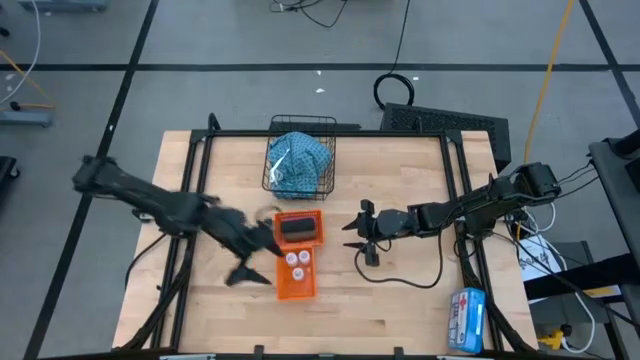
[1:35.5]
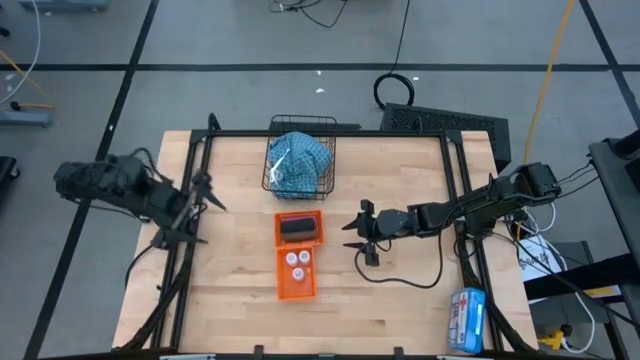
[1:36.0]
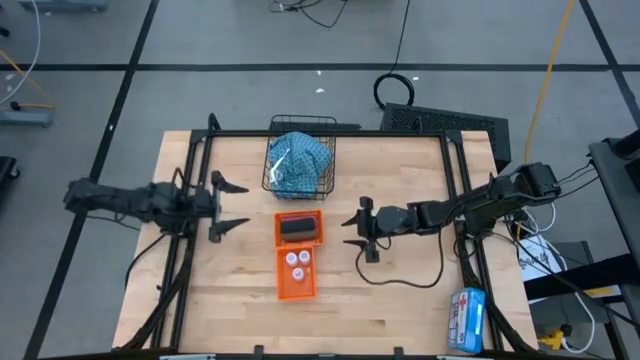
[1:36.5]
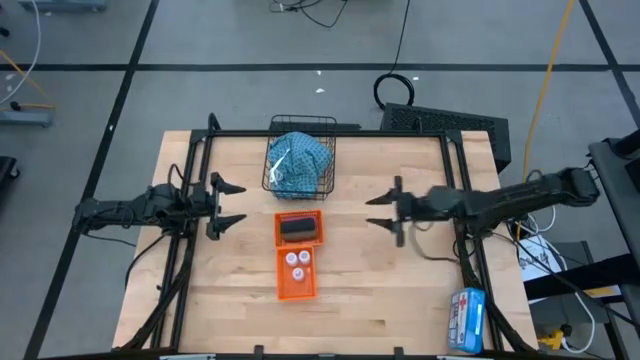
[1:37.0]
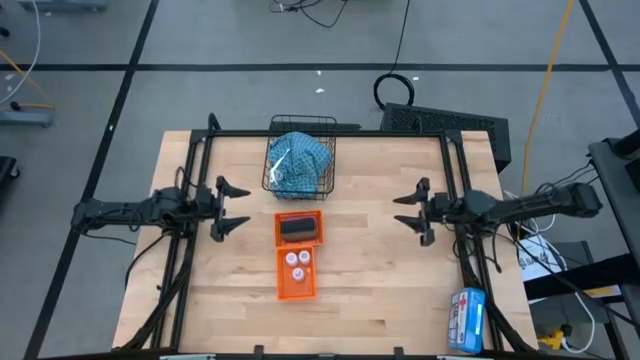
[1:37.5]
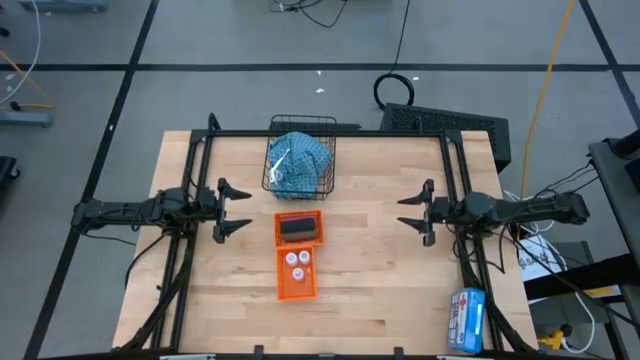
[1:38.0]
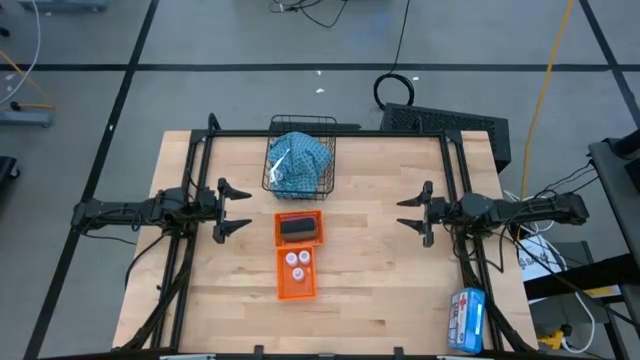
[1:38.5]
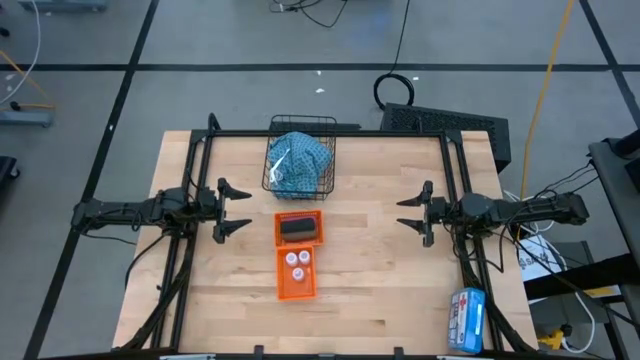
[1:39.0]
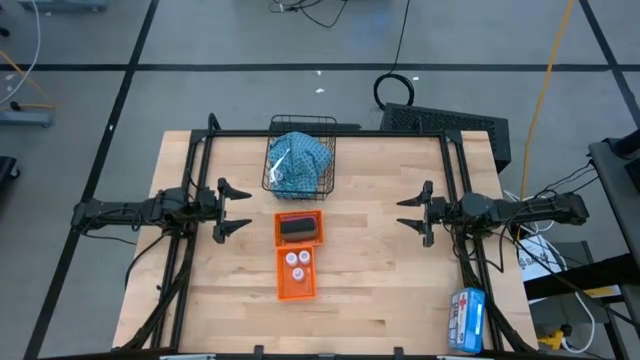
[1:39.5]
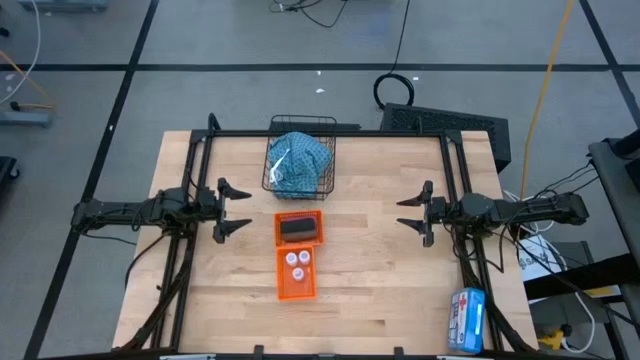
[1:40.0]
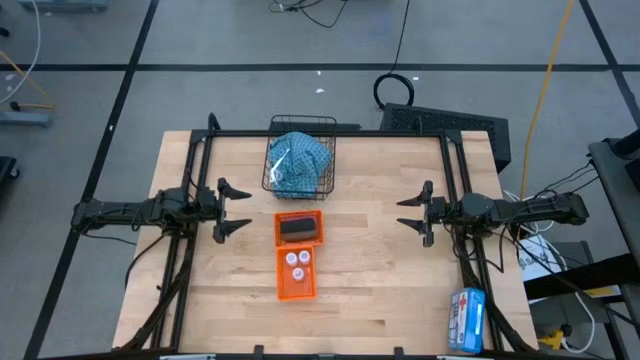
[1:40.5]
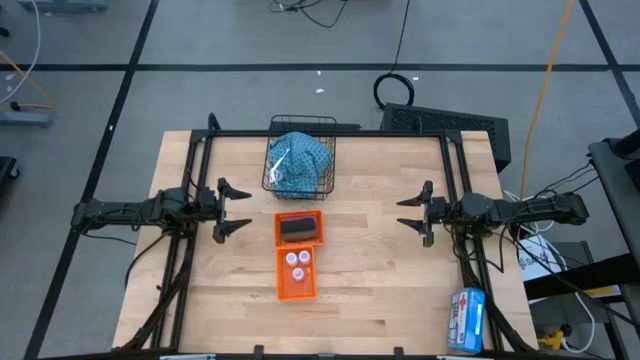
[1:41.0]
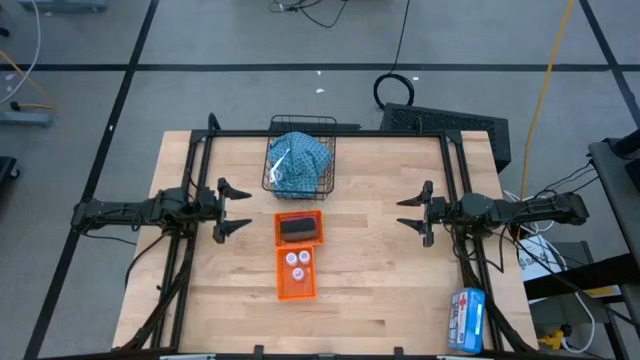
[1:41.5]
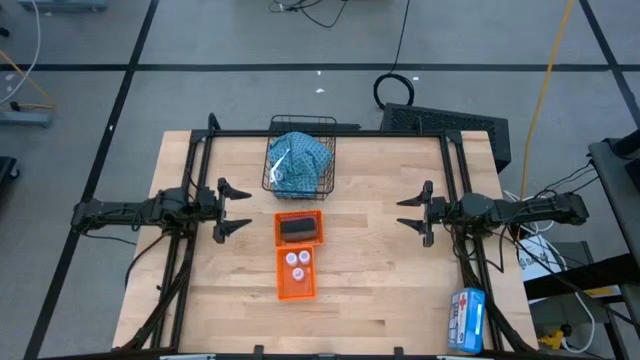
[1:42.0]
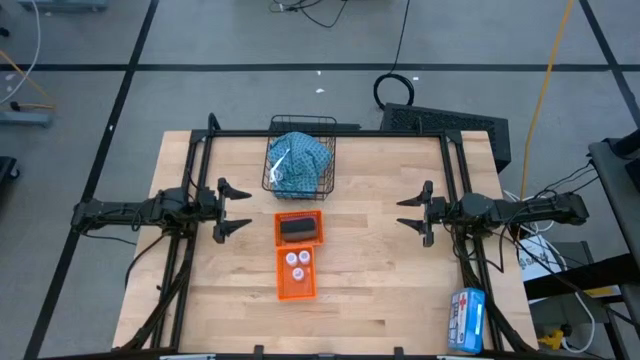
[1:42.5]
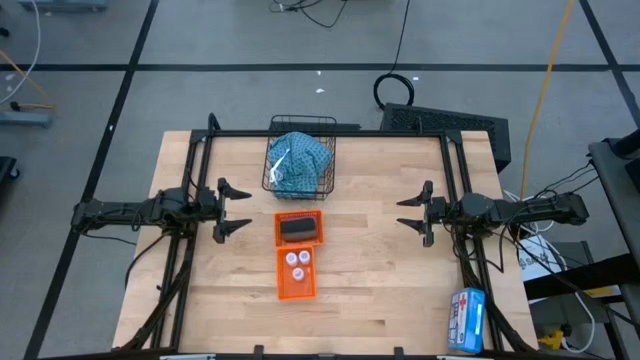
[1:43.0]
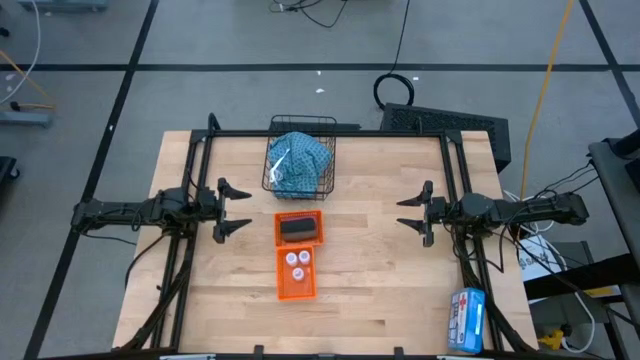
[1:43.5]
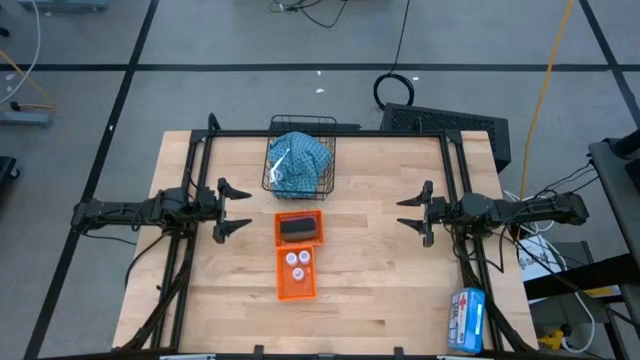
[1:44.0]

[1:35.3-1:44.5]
Task: Pick & Place Medicine items
Return to Home Position

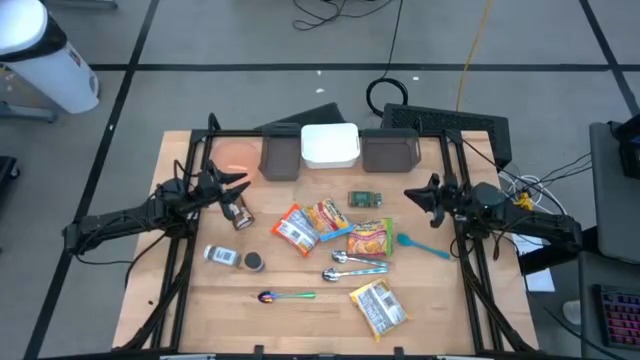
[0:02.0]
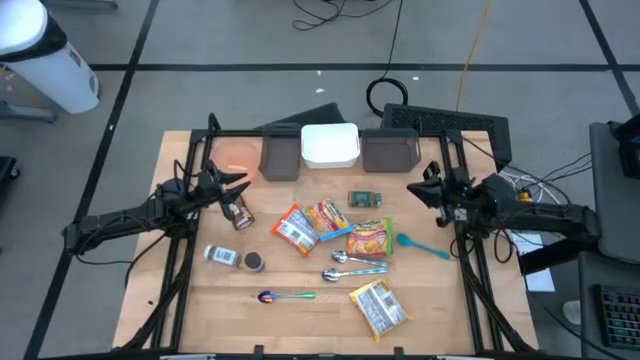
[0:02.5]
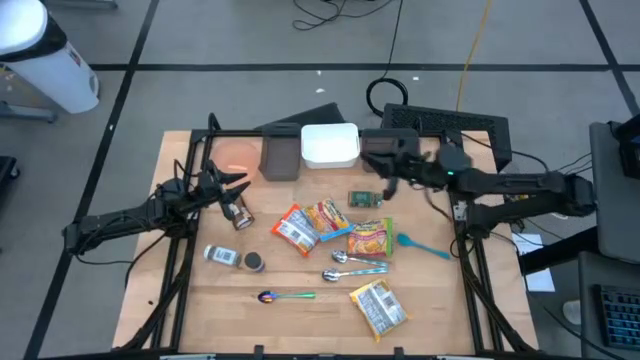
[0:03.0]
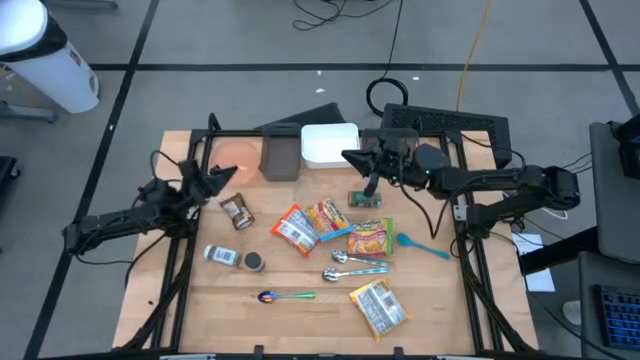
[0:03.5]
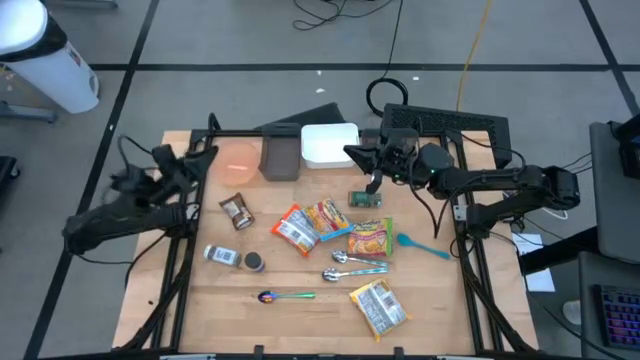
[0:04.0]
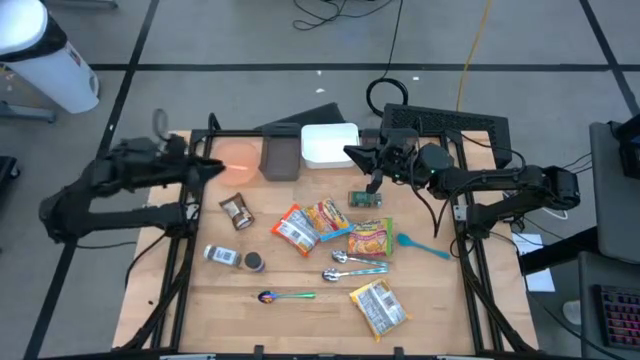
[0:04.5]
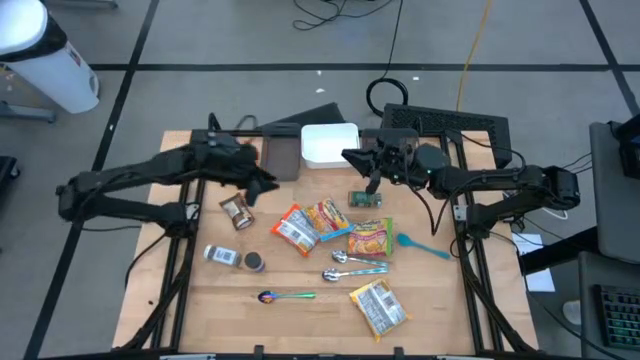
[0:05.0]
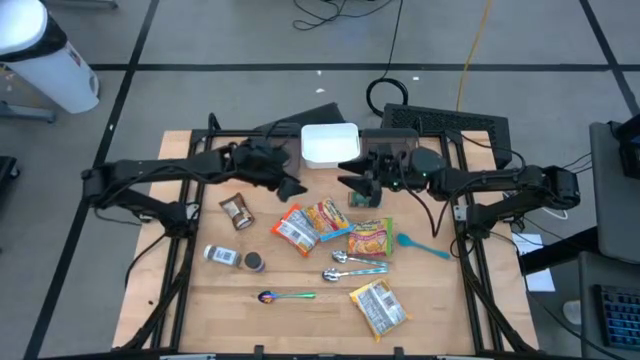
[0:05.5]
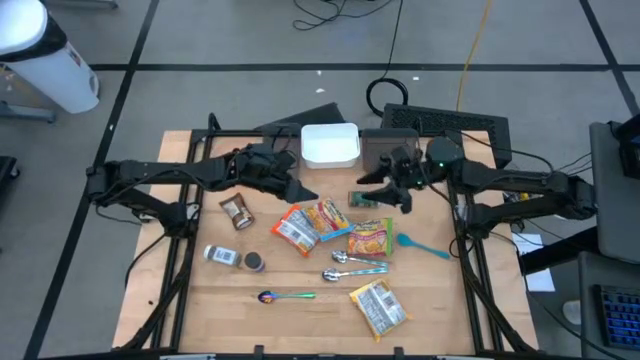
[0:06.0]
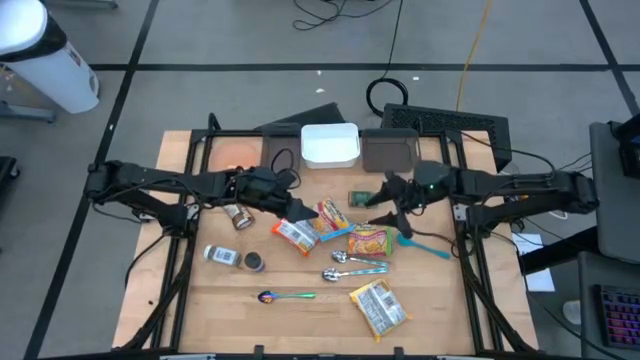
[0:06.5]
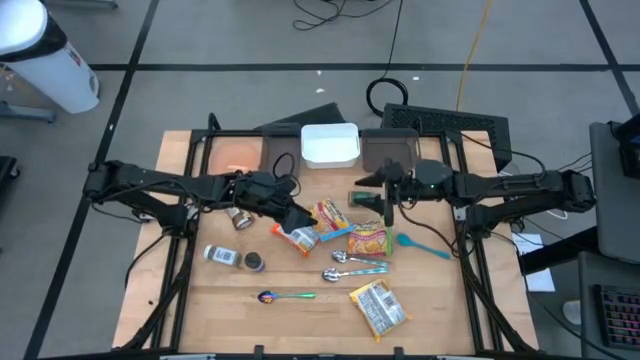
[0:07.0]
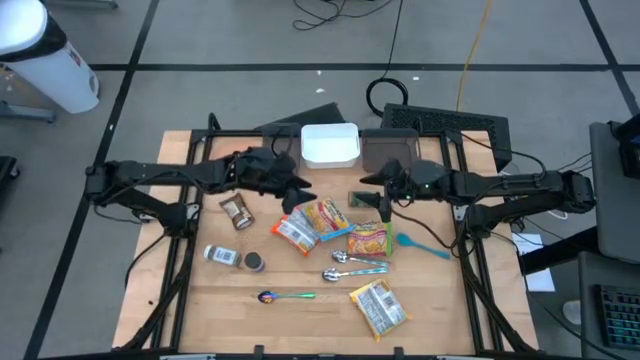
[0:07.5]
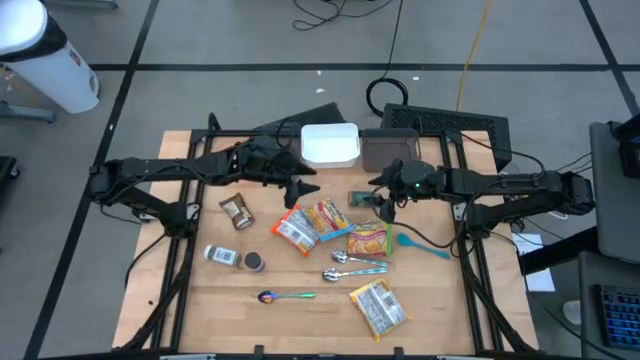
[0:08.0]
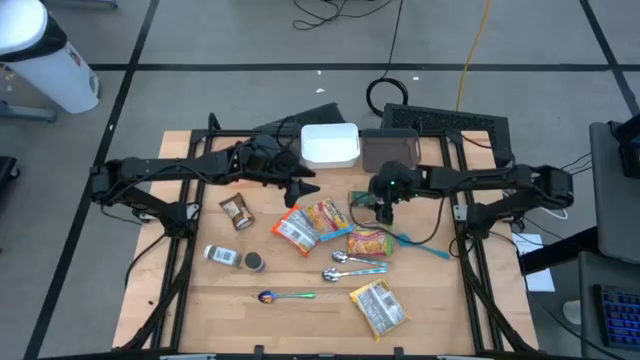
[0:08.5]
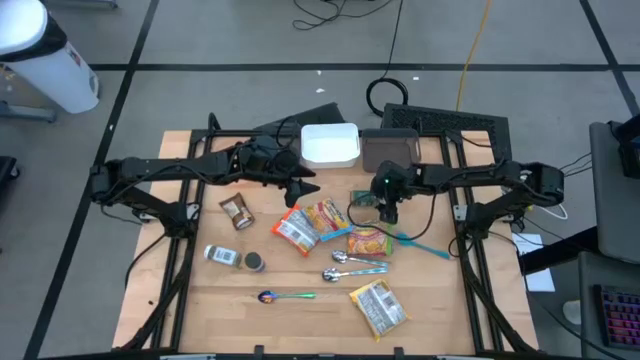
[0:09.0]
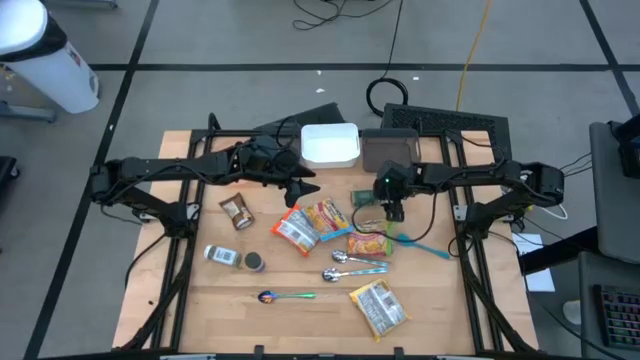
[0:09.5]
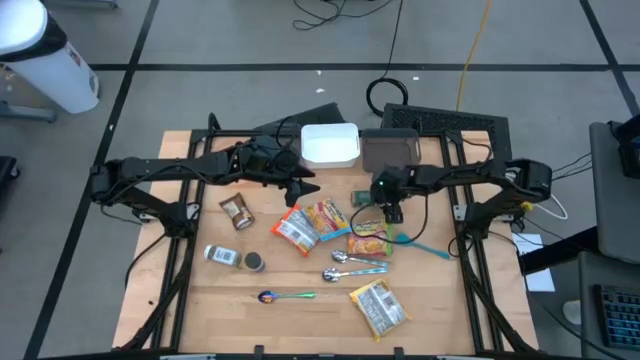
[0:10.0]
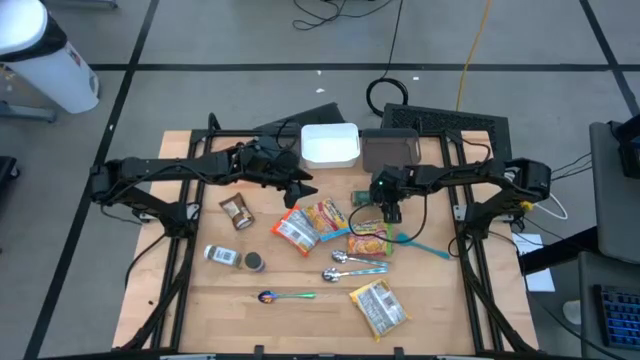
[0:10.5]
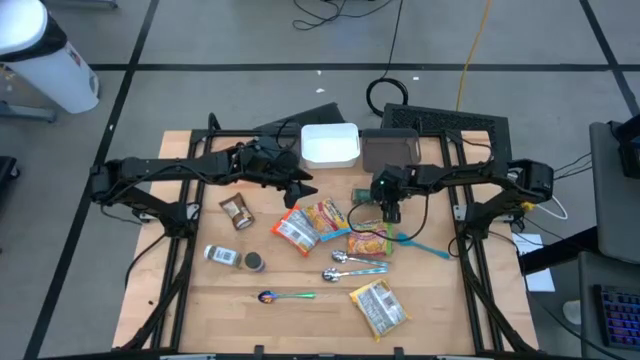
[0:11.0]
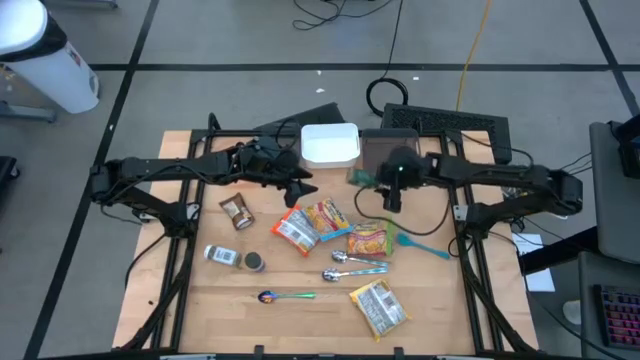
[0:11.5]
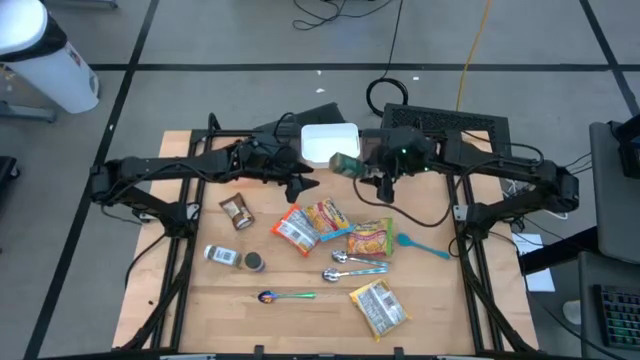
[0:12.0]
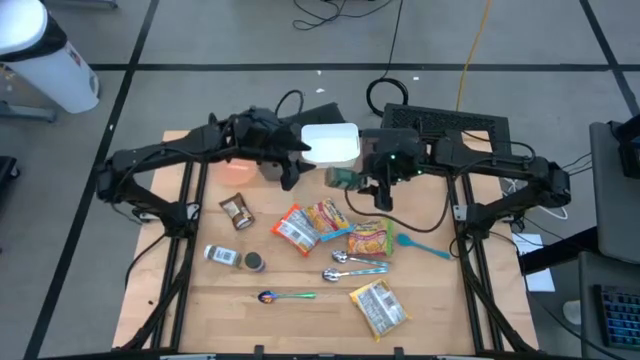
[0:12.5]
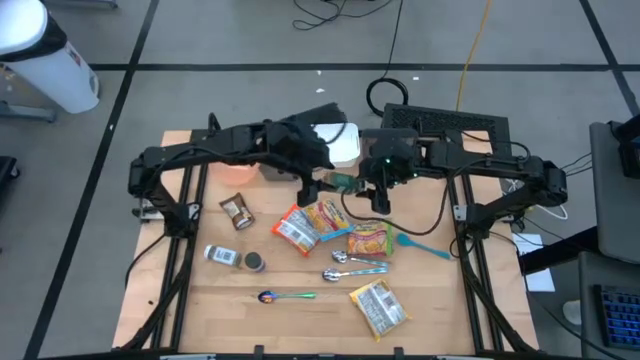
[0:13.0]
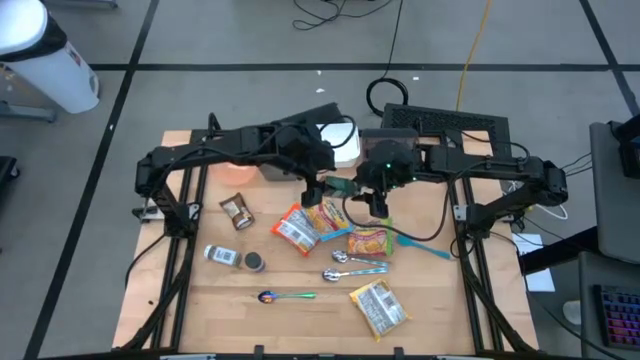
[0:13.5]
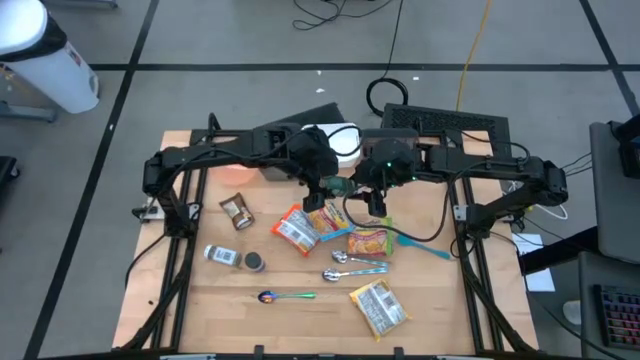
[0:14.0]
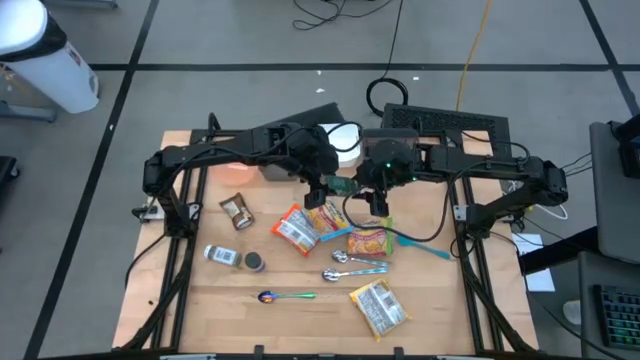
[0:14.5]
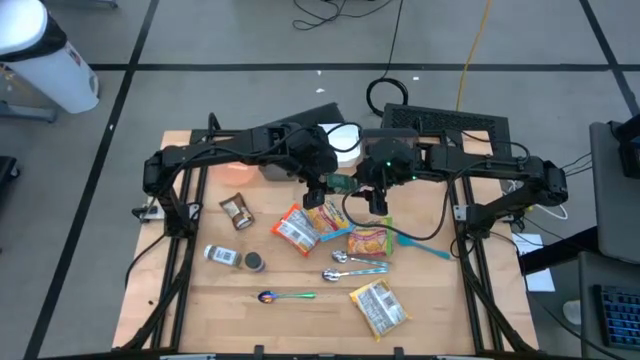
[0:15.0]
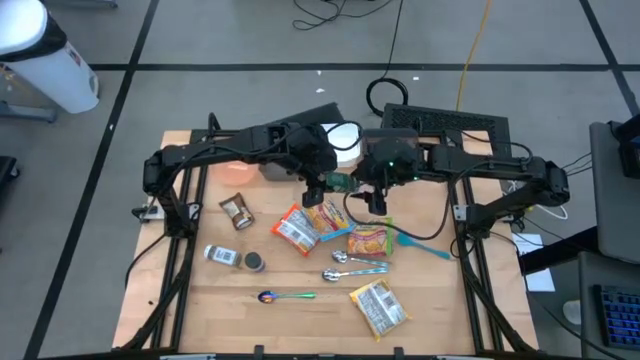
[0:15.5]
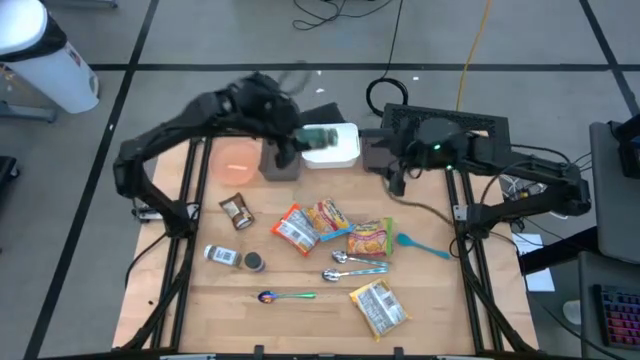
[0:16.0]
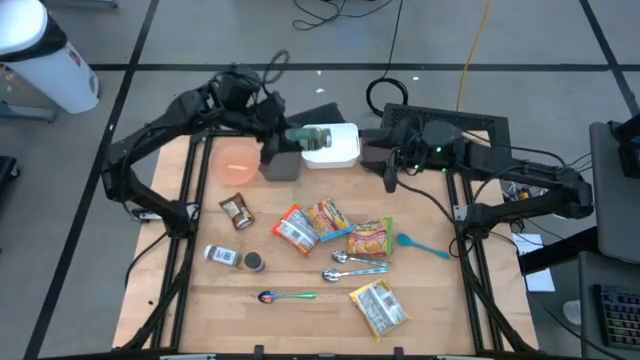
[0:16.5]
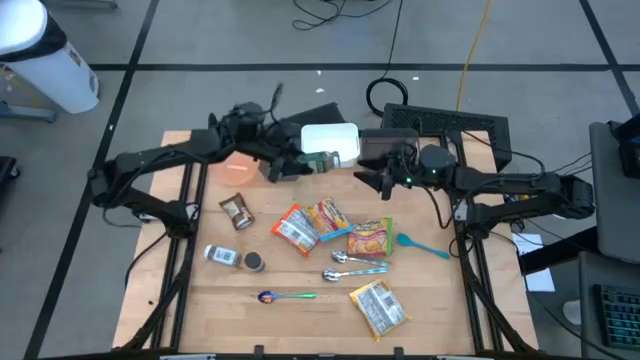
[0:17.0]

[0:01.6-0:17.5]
Task: Pick & Place Food Item
Put the green seasoning bottle into the left black bin
